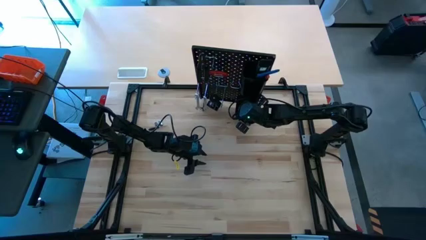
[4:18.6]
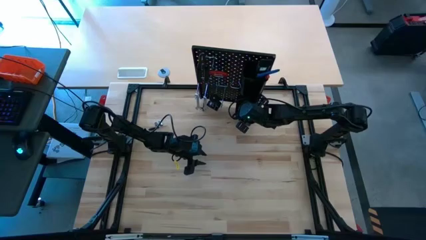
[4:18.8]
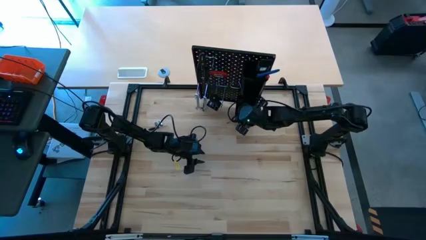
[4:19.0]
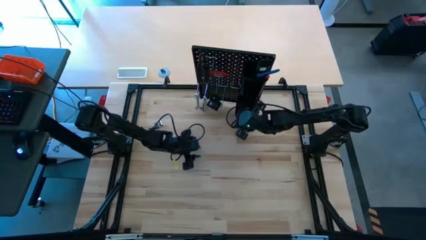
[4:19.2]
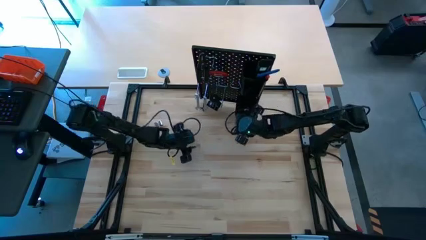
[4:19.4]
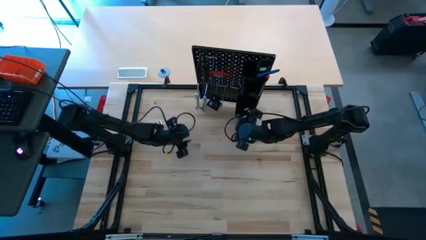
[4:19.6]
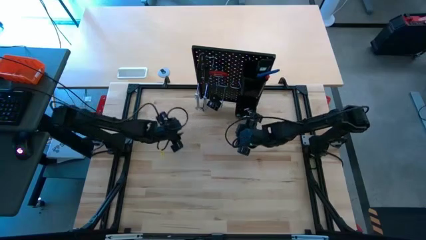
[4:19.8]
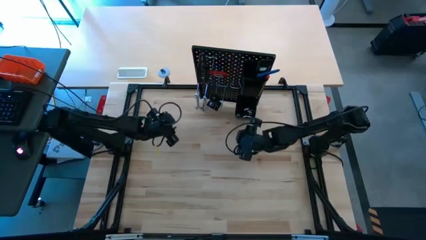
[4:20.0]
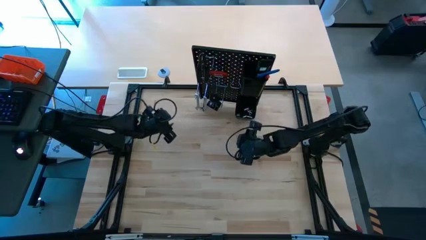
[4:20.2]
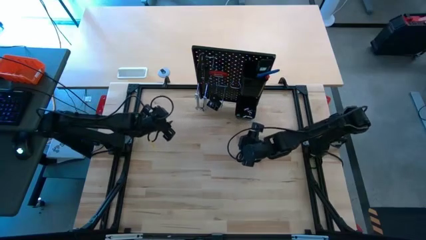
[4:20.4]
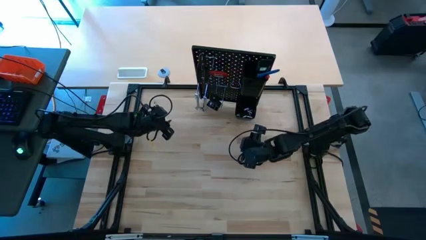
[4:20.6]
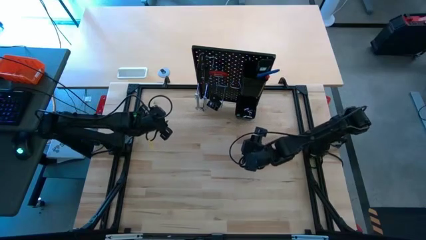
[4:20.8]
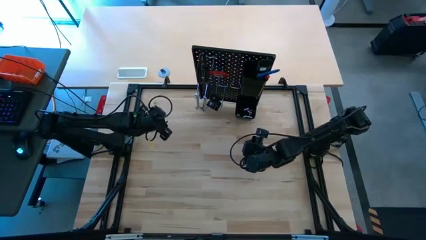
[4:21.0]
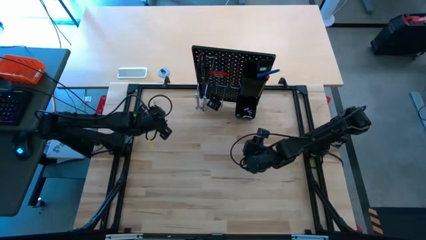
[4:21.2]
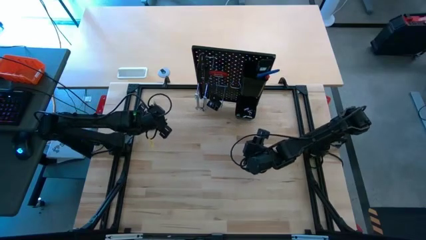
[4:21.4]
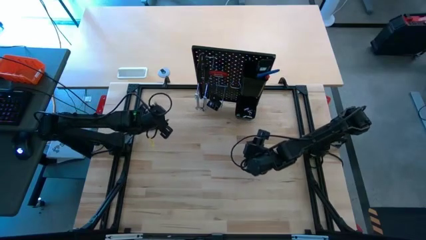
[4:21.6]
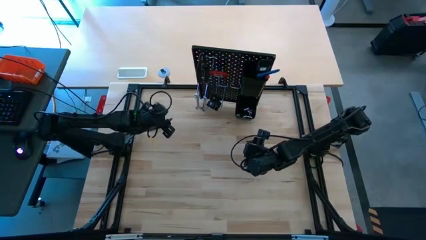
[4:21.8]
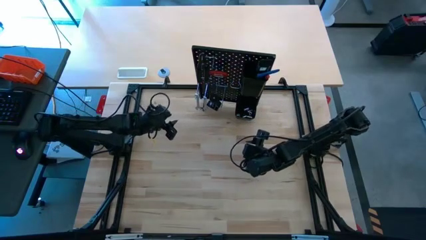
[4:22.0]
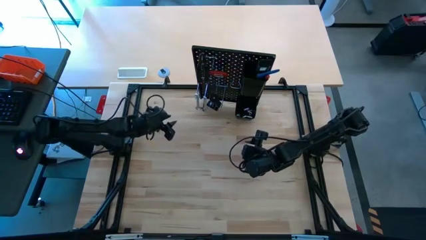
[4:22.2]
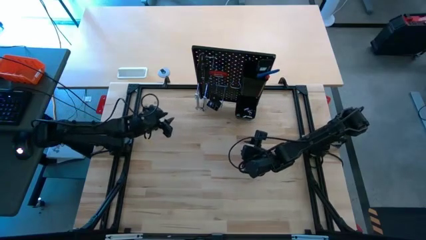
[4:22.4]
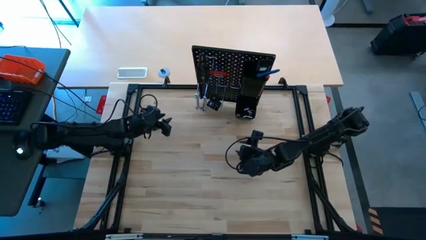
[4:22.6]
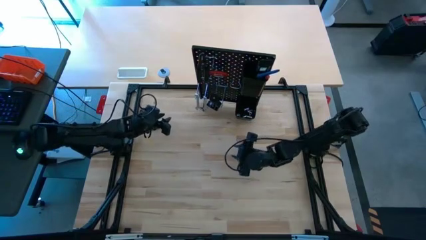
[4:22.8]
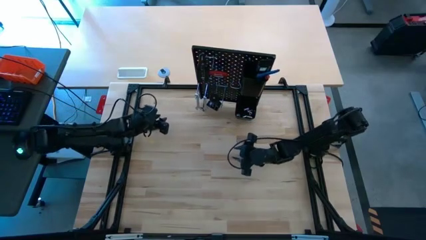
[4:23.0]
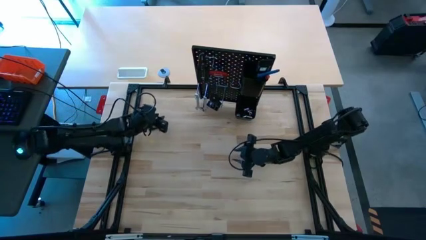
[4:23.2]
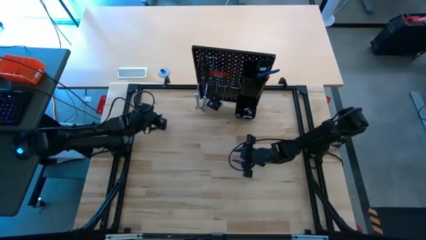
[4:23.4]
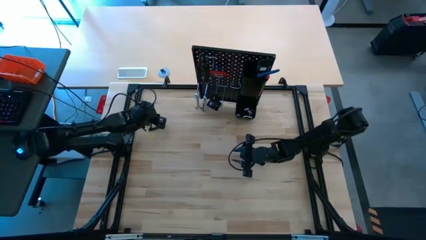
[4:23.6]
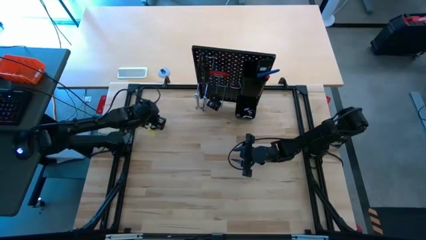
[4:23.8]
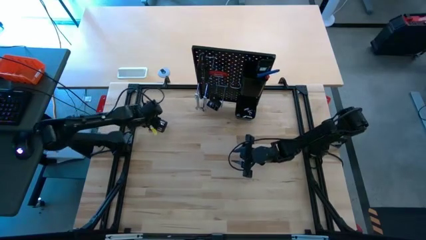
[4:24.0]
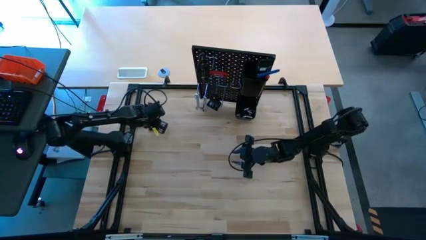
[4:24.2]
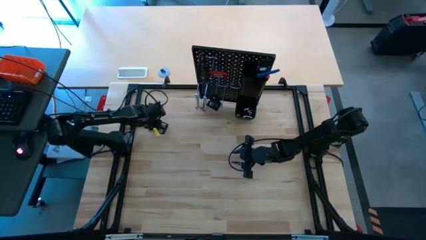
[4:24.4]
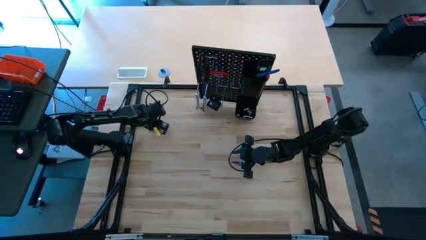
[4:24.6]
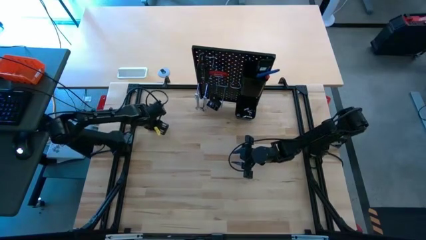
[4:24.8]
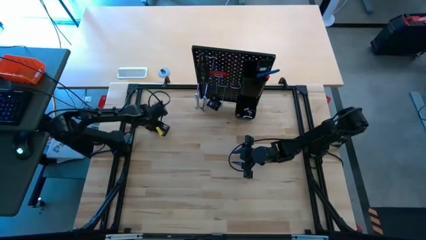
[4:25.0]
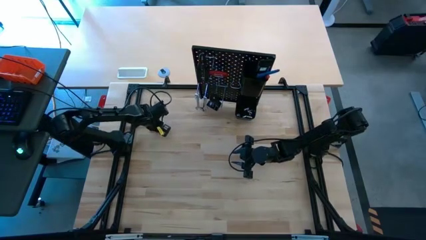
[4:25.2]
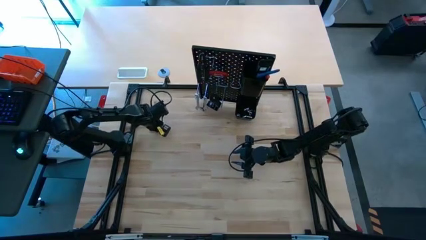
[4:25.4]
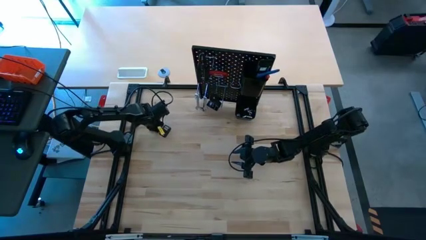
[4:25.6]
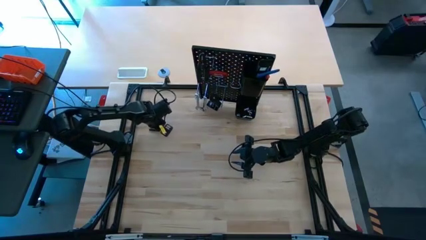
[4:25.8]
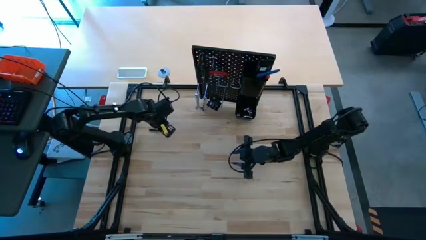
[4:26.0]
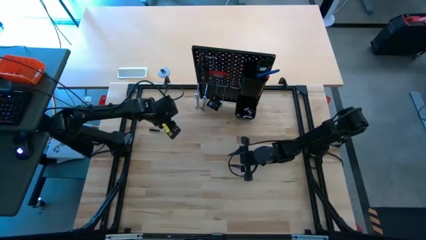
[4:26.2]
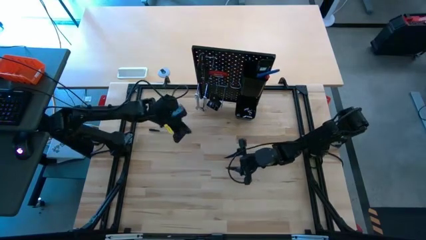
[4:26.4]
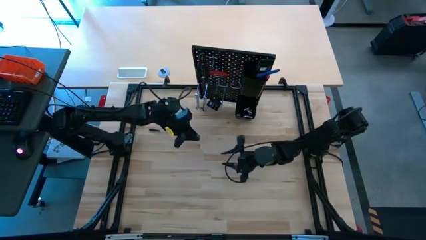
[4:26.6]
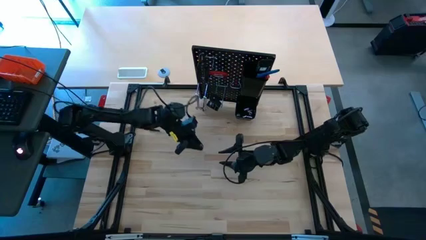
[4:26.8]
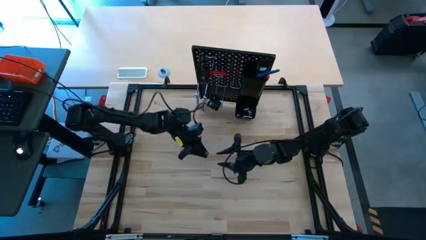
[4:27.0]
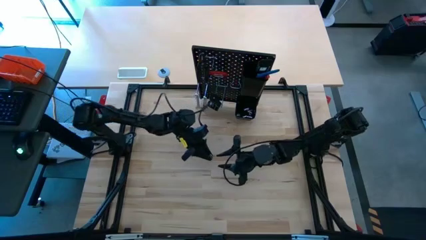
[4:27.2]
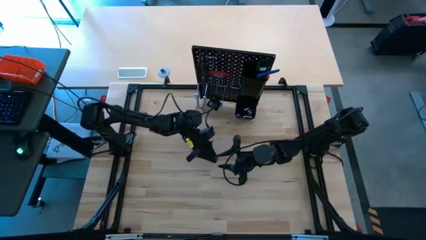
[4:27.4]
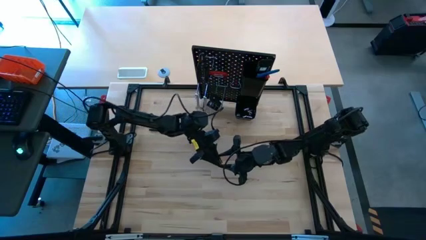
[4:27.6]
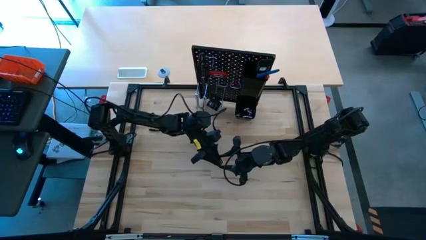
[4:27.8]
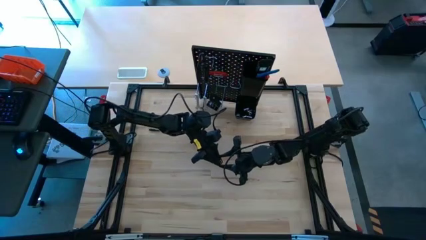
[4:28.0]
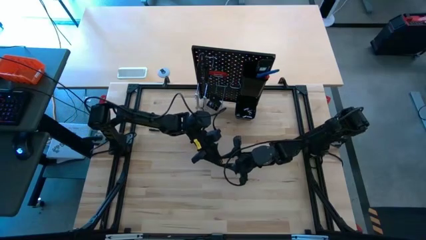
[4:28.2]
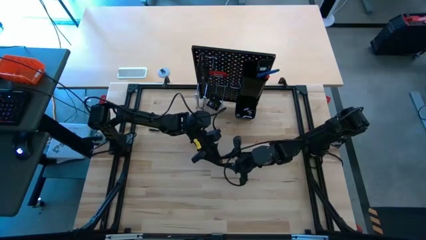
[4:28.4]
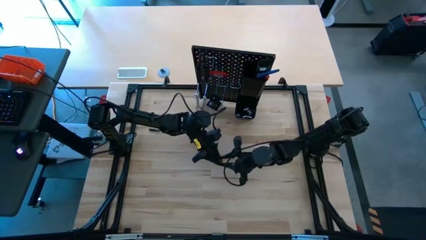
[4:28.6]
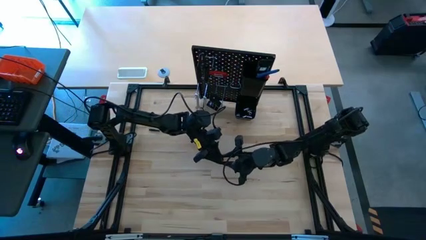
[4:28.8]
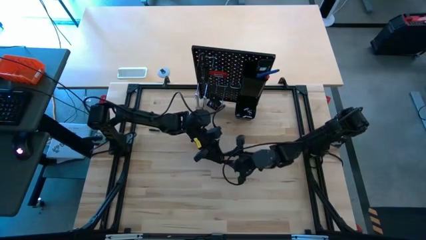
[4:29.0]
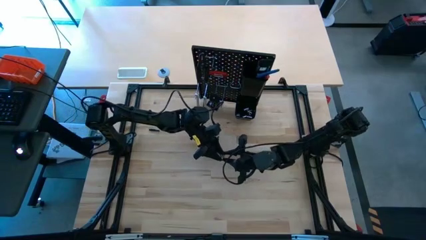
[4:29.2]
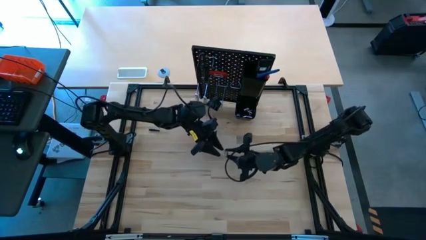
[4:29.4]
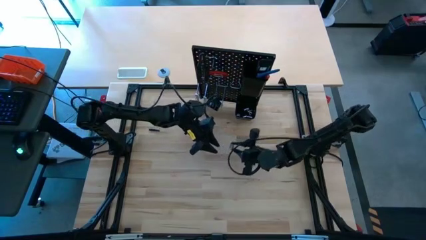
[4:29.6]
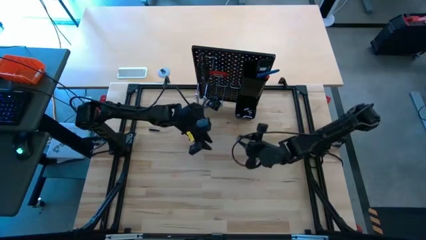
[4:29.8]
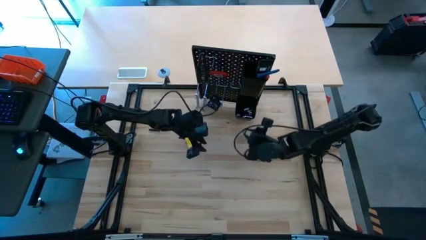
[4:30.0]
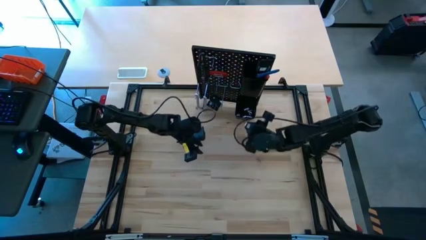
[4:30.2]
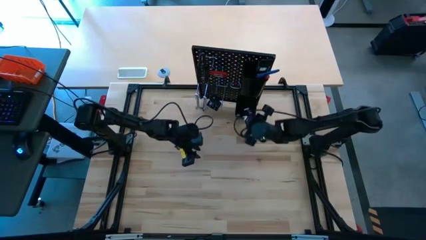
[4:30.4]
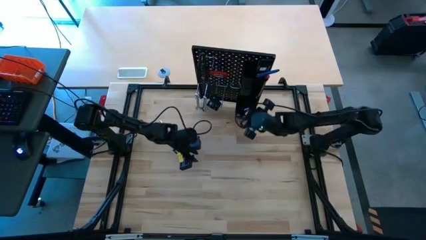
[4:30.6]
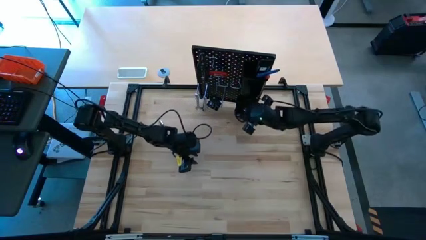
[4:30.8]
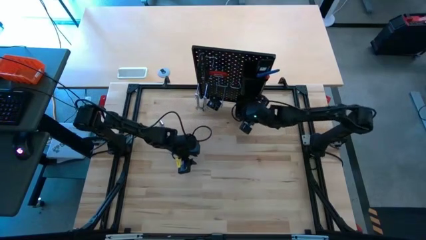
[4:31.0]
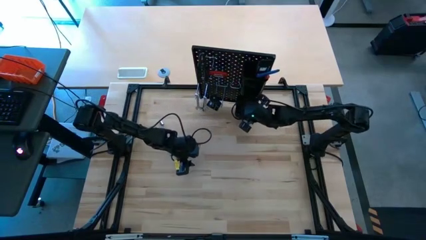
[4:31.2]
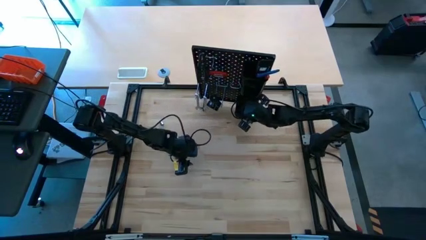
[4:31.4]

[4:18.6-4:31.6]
Task: Hang tools onto peg board
Put the socket into the bottom black bin on the peg board

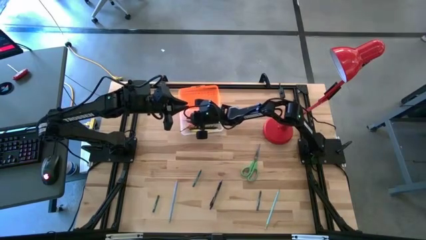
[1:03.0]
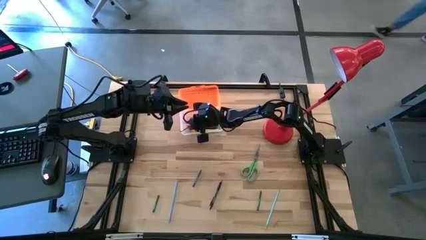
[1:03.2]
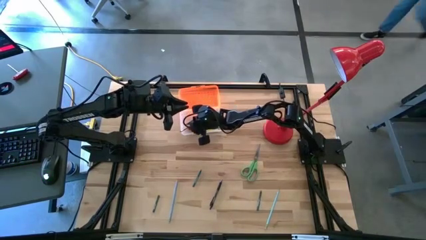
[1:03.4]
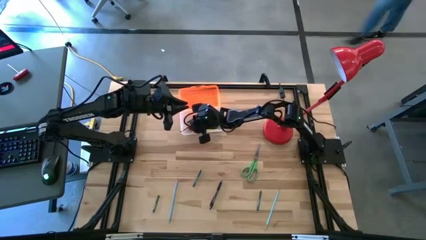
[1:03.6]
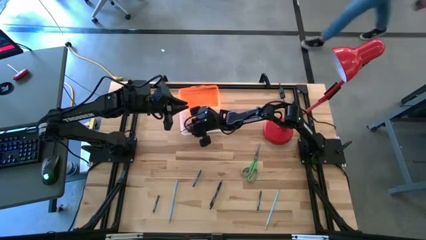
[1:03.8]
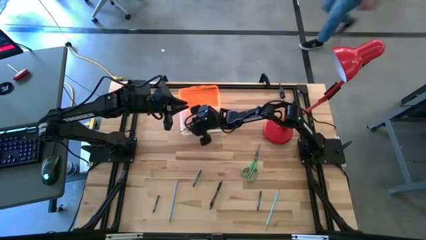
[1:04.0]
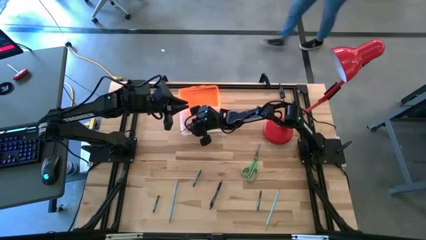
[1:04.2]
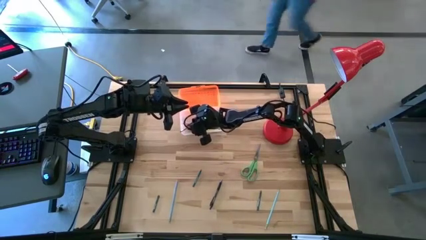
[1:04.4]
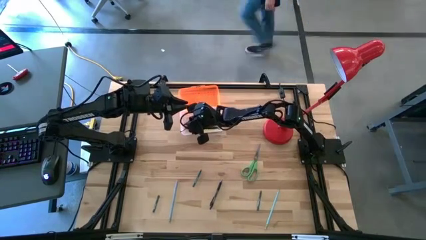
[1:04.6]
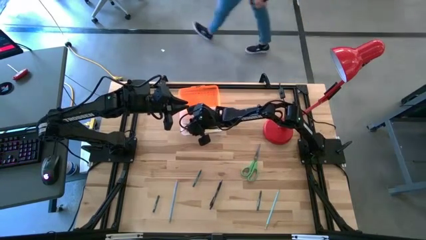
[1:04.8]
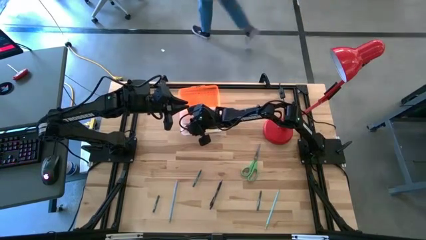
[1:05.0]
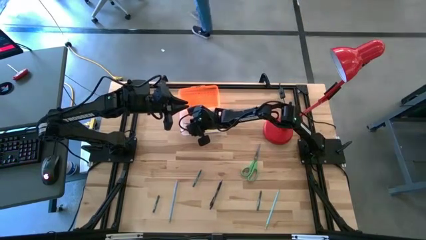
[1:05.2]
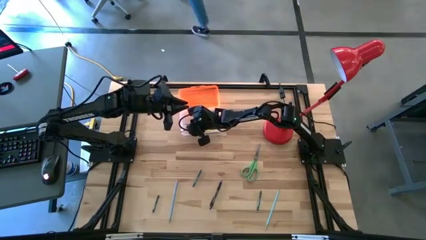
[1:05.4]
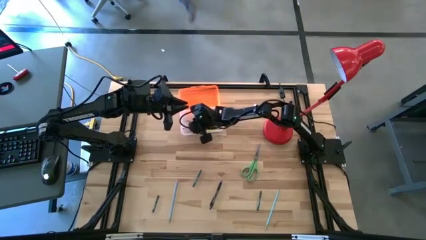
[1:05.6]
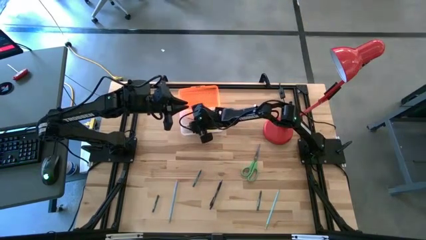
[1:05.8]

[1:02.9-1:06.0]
Task: Pick & place school supplies into a supply box
Adjust the orange pencil into the orange supply box
